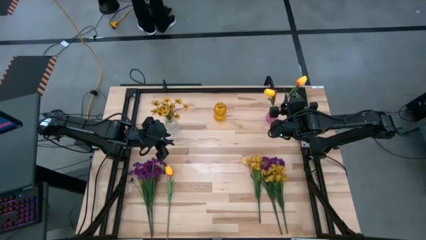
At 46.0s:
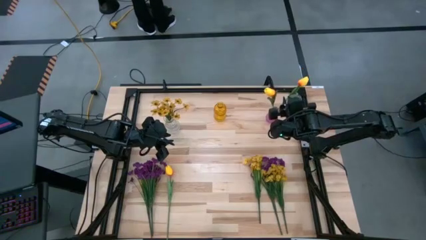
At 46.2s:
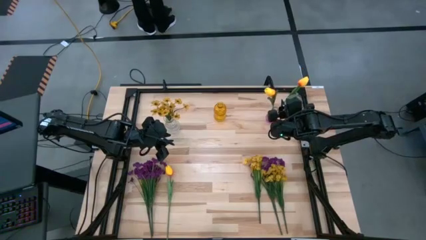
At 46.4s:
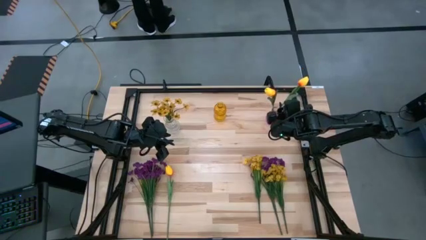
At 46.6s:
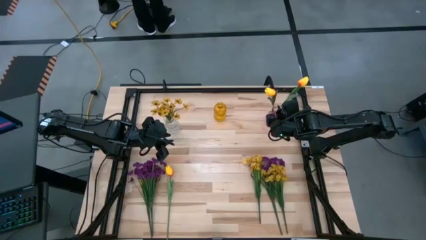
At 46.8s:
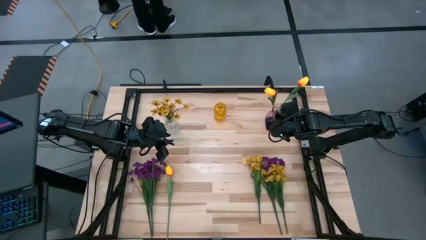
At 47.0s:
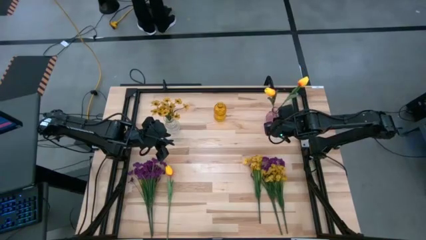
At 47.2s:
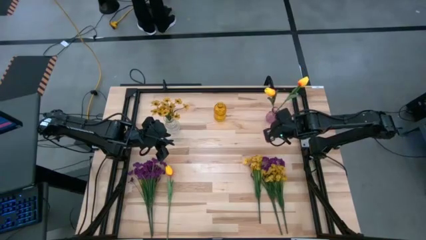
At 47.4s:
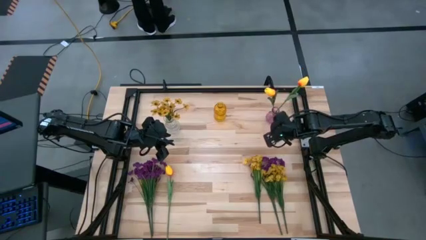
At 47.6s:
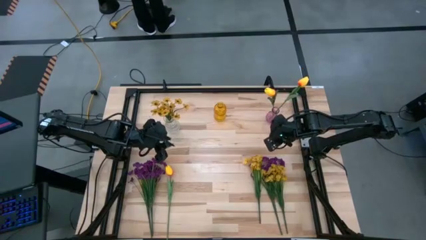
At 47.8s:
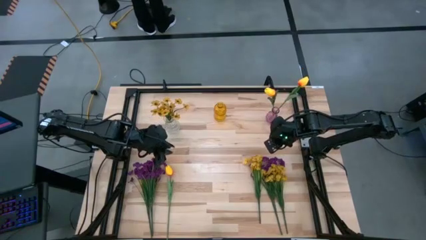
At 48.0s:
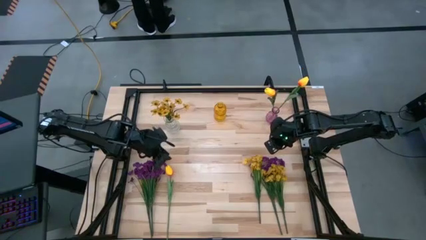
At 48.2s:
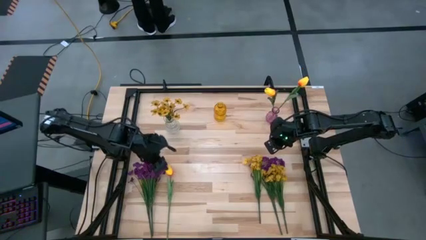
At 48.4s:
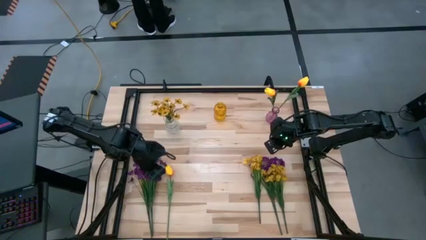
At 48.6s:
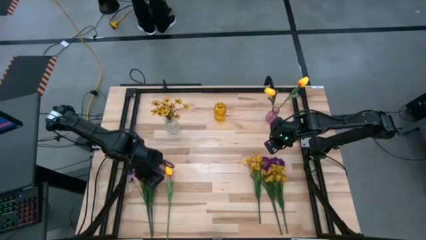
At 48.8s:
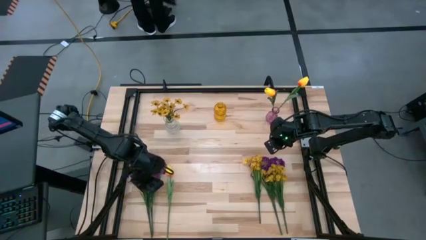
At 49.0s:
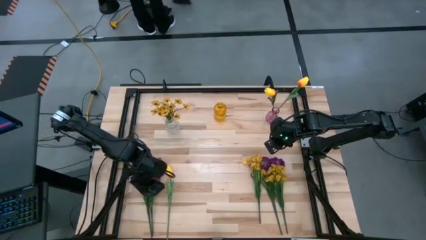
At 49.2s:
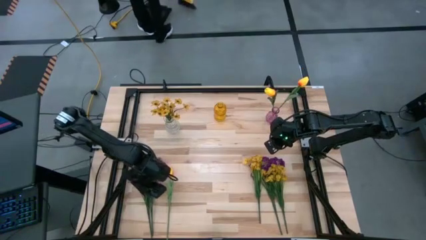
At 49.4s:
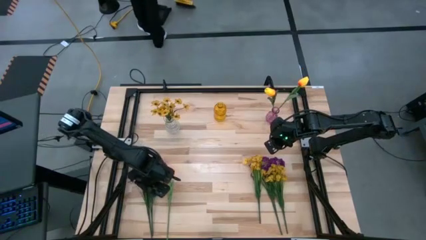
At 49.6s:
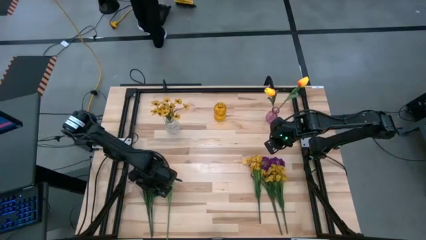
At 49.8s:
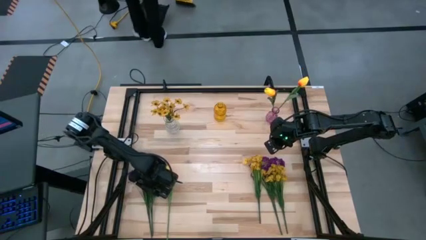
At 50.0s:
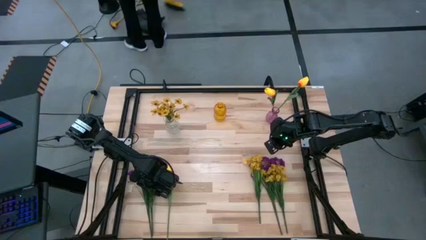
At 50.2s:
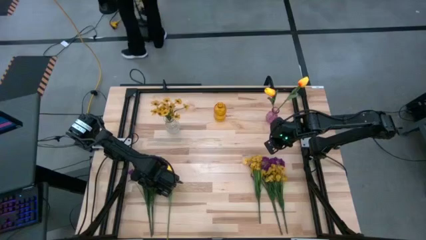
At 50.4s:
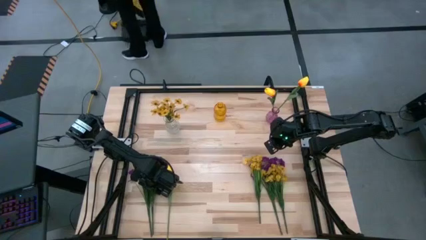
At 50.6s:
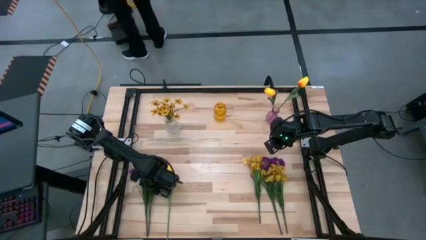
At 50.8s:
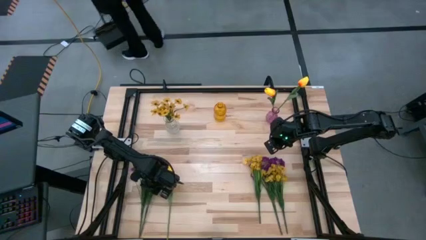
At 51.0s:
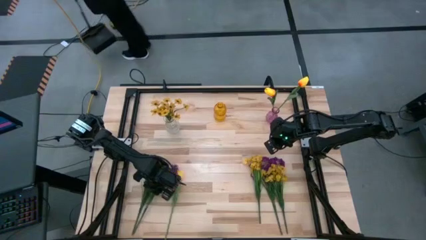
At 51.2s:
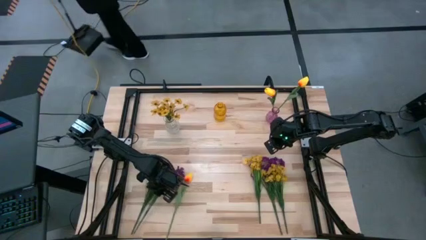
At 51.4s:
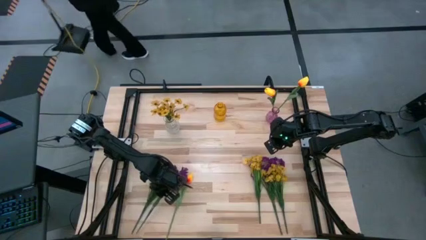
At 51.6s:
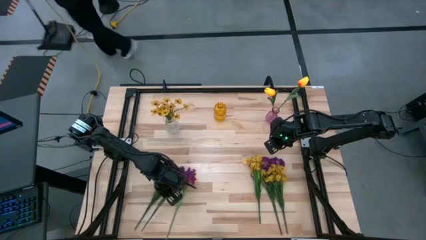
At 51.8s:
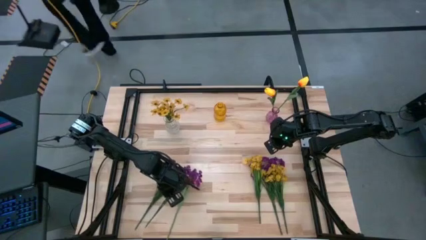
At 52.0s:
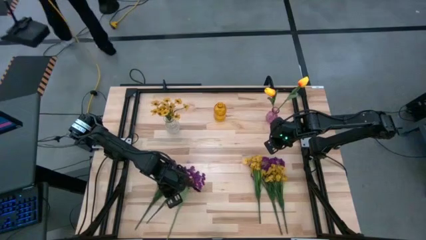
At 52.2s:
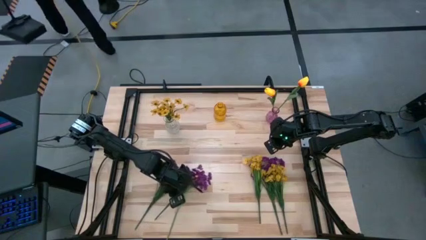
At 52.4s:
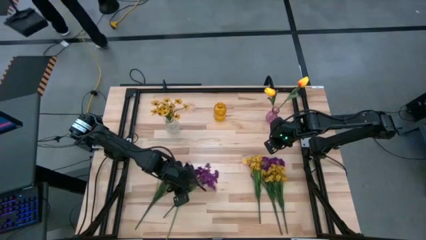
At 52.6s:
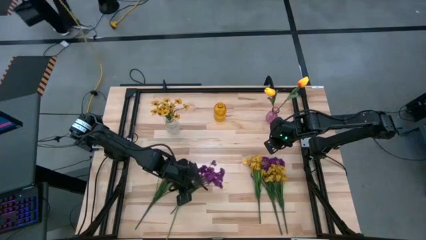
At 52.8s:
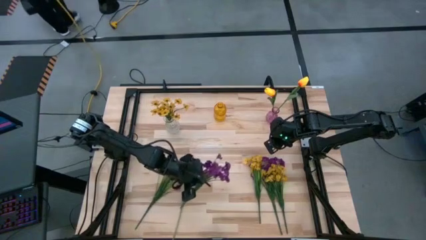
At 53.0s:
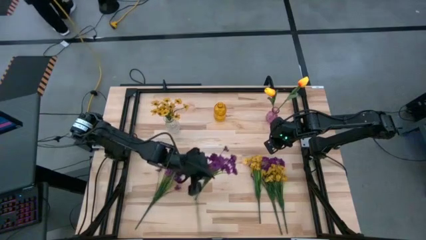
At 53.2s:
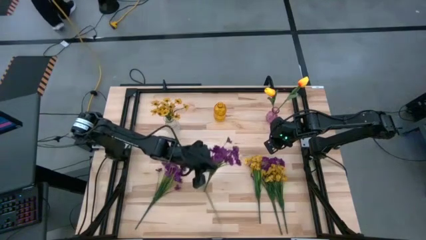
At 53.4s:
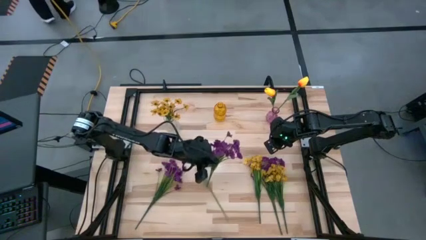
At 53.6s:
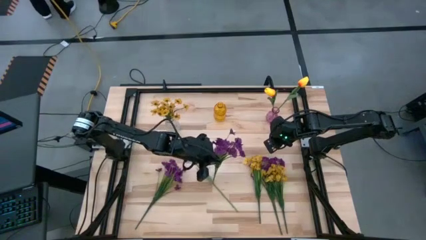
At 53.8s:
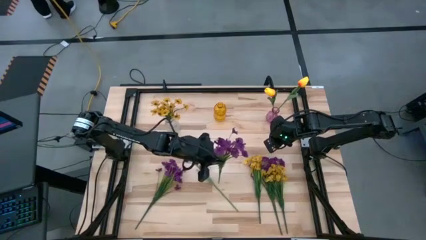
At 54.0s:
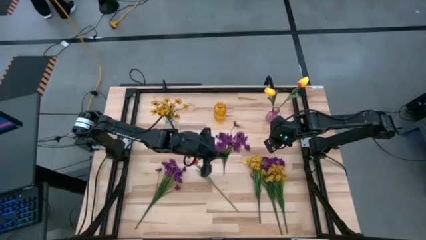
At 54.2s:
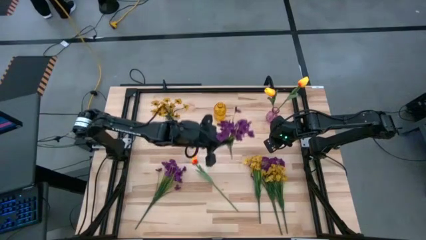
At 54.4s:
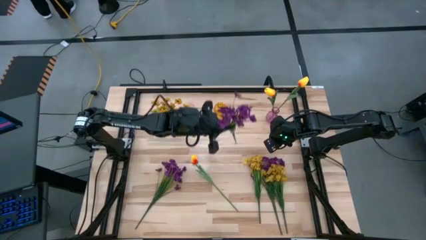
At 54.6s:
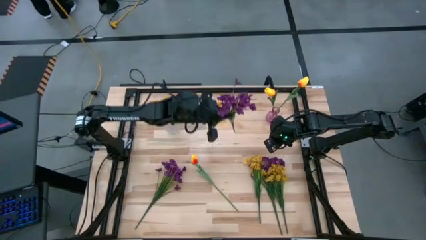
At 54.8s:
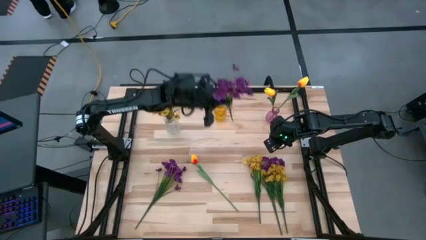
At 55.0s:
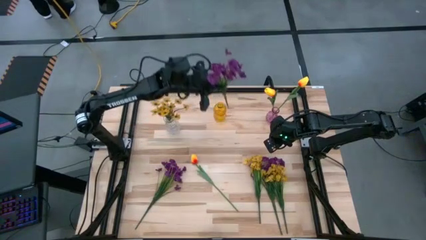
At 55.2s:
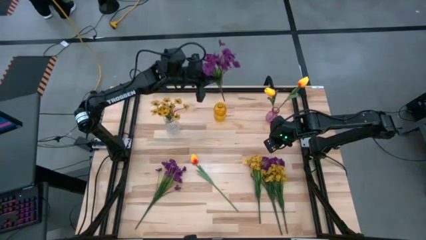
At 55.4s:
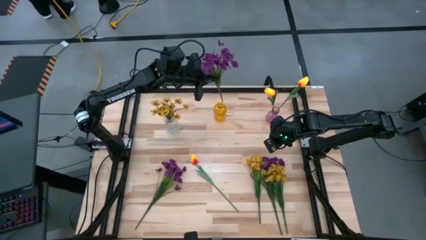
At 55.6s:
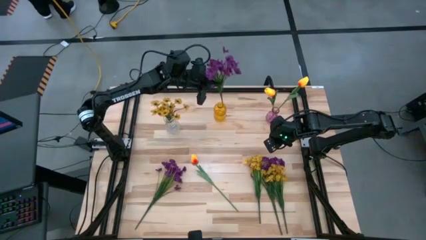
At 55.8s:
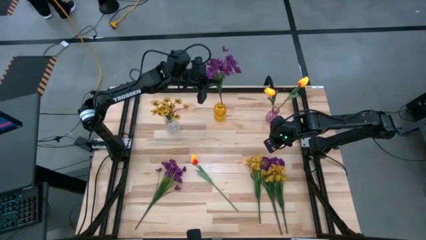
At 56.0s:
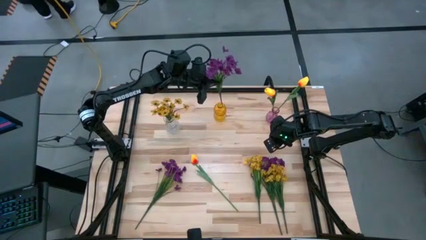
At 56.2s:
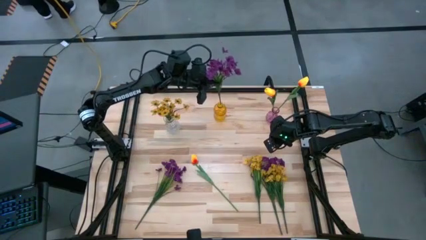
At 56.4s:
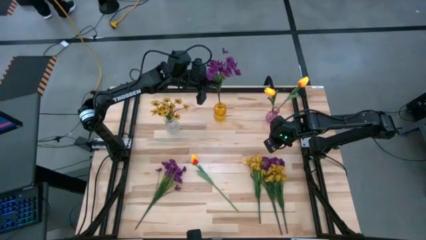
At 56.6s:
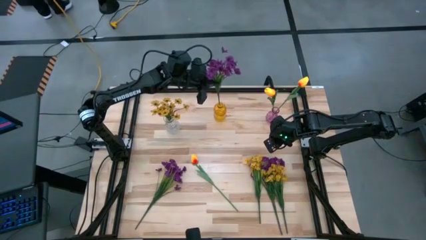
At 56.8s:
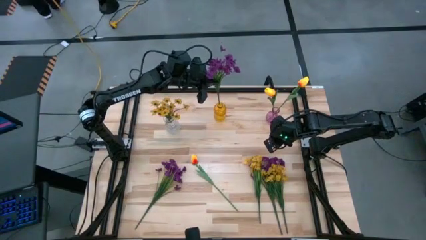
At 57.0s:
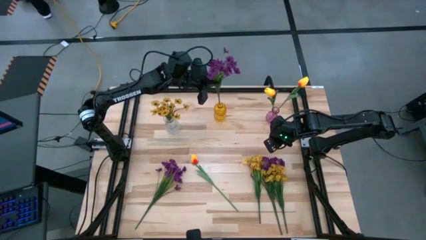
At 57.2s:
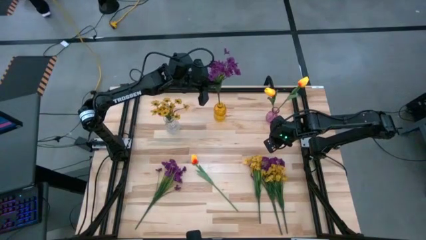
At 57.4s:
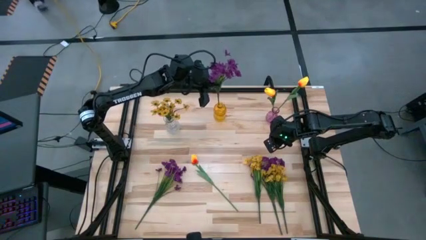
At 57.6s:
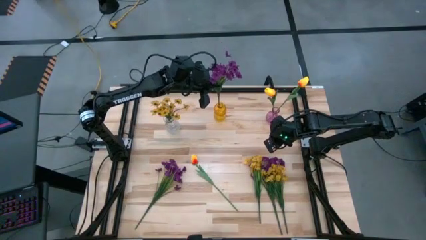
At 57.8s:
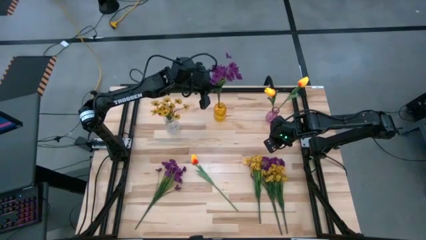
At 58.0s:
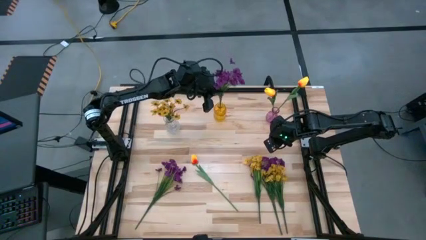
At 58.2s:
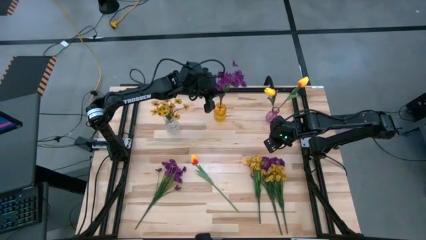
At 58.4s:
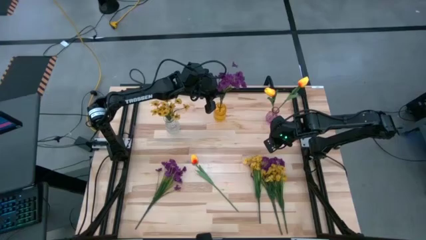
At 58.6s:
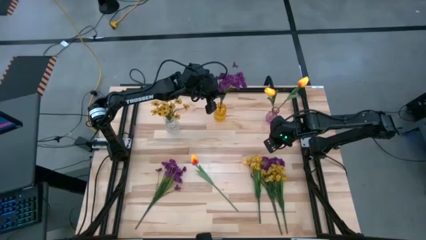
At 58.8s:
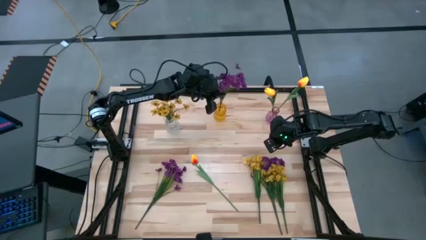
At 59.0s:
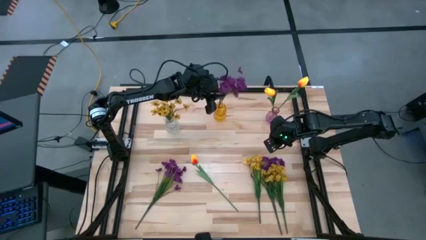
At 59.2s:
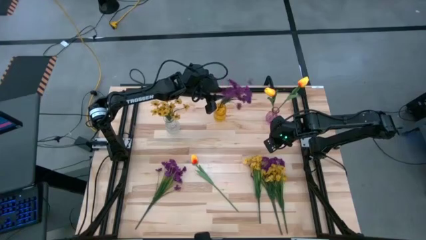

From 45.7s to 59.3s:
Task: Sort flowers into vase by color
Put the middle purple flowers into the yellow vase

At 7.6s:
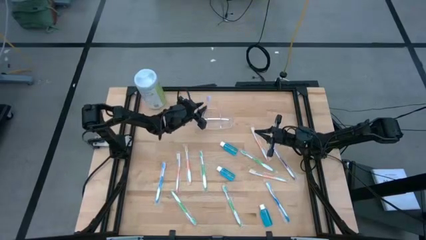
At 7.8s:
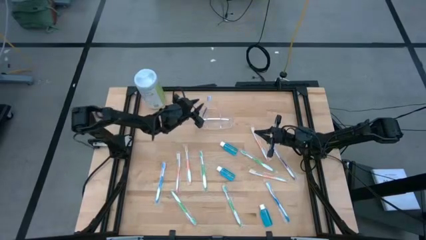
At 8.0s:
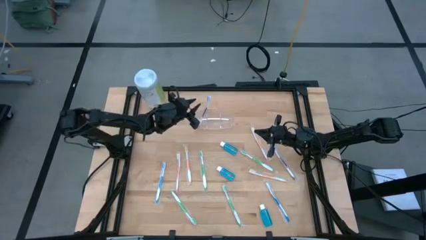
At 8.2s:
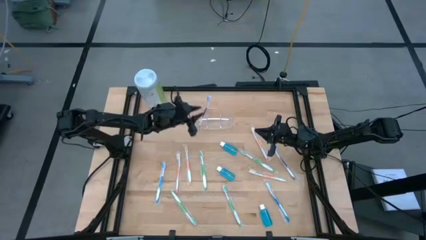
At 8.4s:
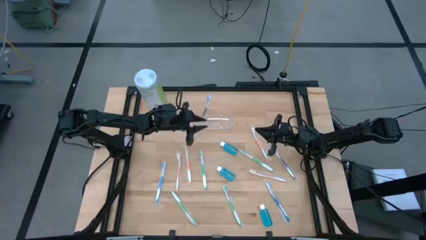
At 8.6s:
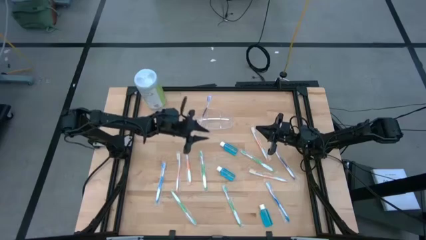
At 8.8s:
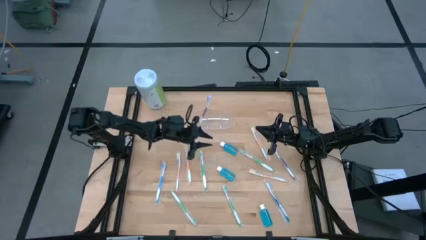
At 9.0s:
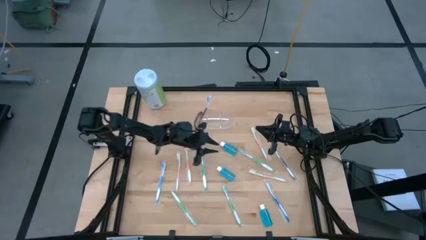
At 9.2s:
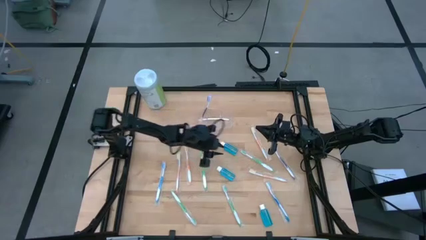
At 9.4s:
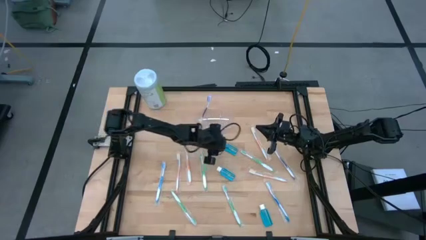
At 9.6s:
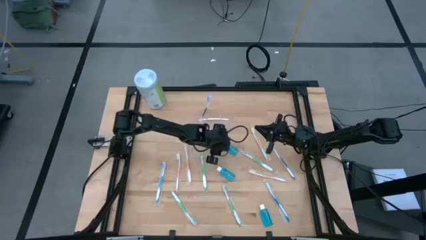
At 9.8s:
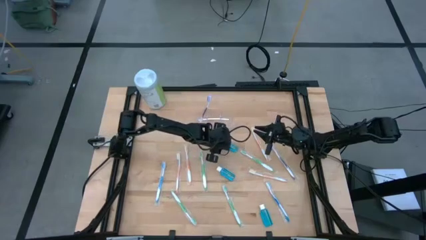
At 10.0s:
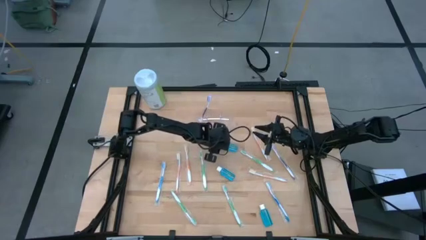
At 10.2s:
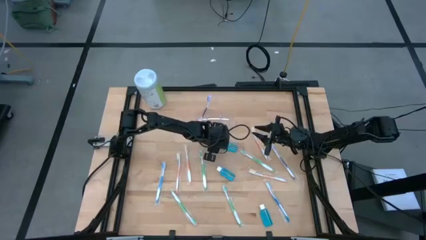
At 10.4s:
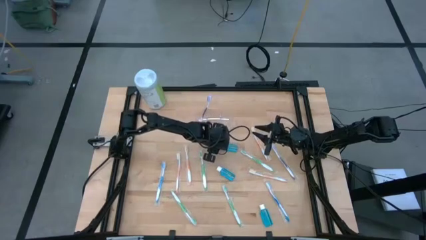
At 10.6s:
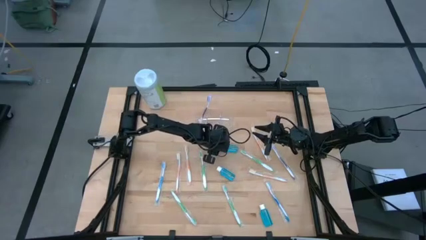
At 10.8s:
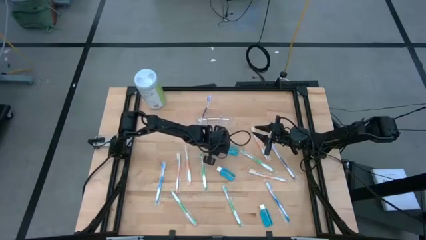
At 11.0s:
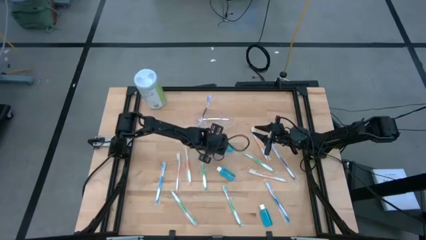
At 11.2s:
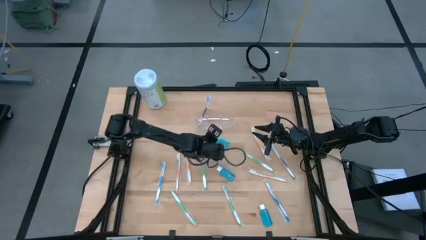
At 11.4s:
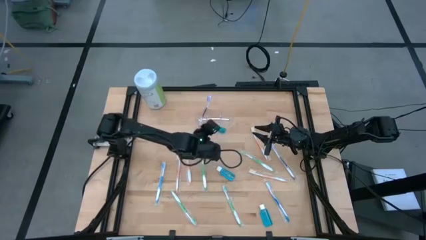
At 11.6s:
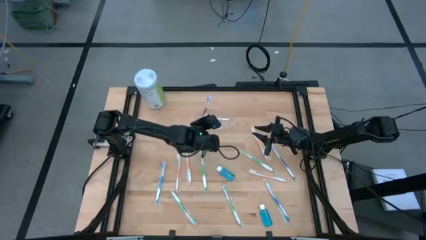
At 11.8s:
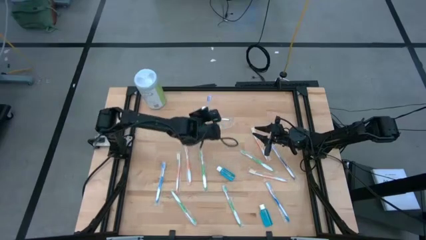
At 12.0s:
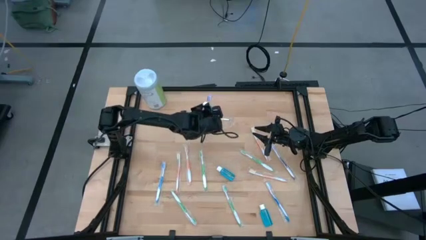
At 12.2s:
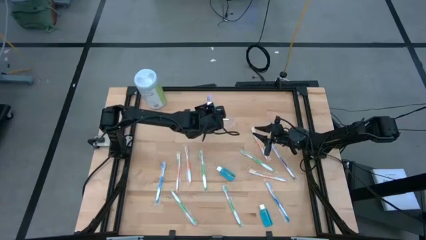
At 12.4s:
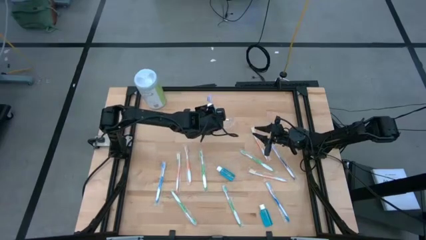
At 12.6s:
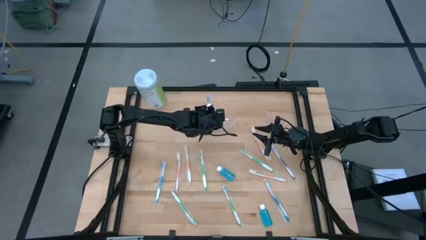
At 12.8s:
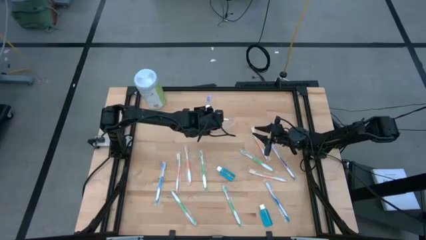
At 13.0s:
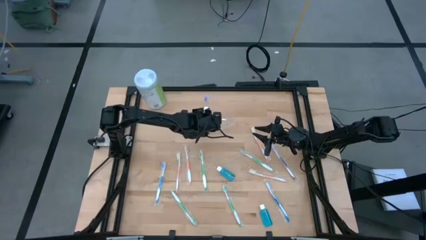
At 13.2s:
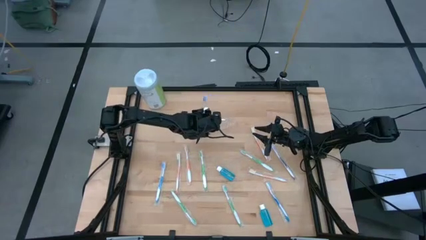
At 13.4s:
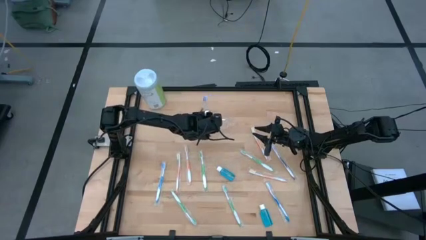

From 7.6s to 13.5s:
Task: Pick & Place toothbrushing station
Put the blue mouthwash in the middle of the transparent organizer
